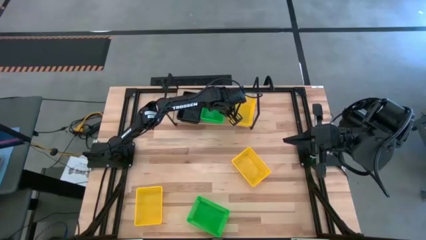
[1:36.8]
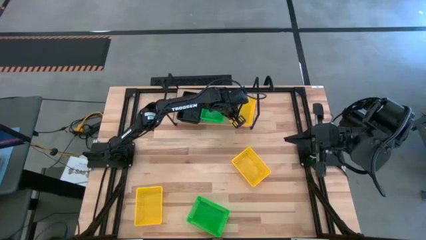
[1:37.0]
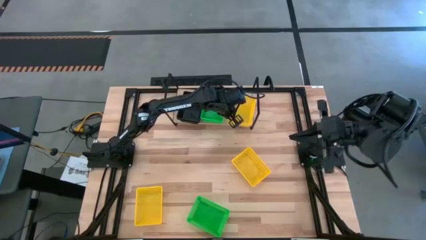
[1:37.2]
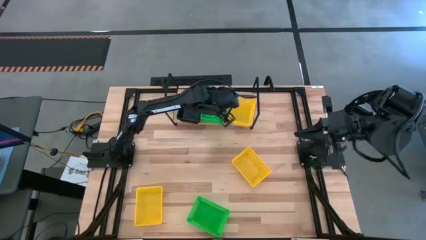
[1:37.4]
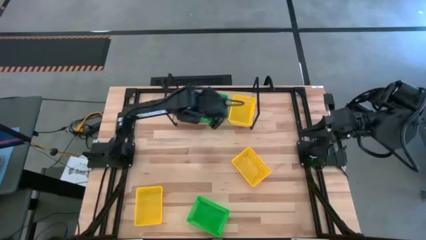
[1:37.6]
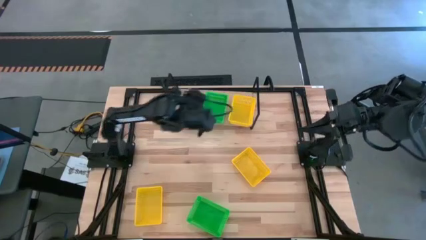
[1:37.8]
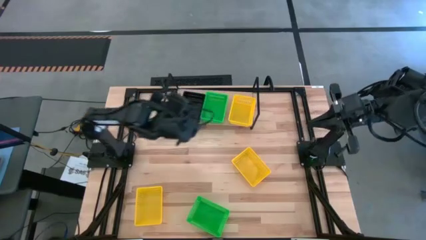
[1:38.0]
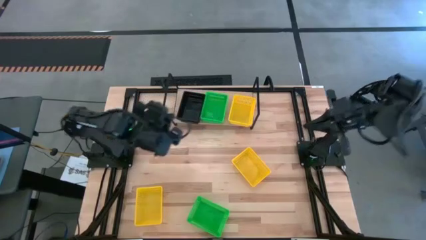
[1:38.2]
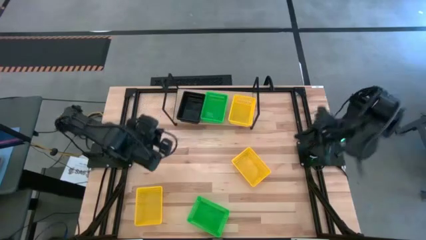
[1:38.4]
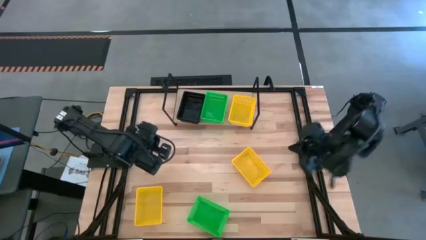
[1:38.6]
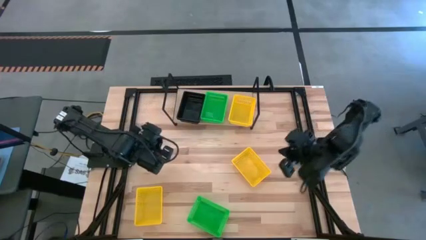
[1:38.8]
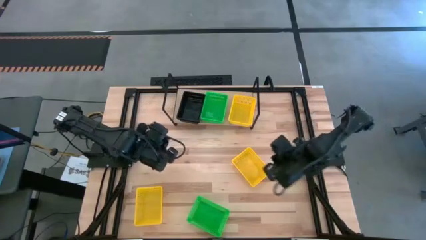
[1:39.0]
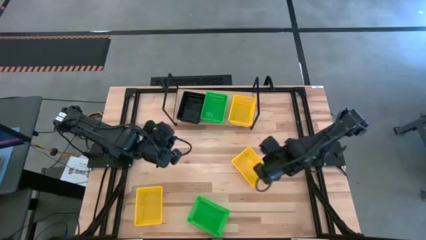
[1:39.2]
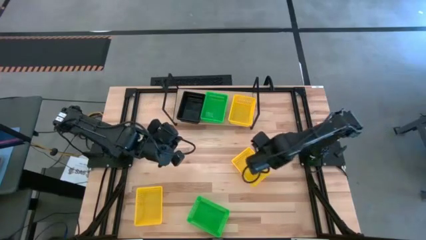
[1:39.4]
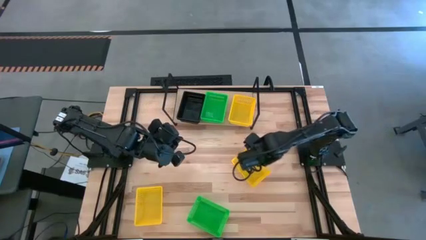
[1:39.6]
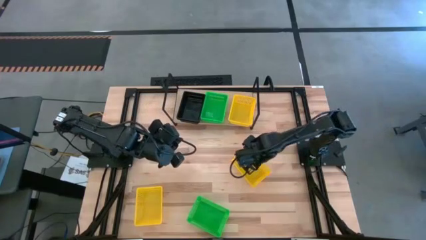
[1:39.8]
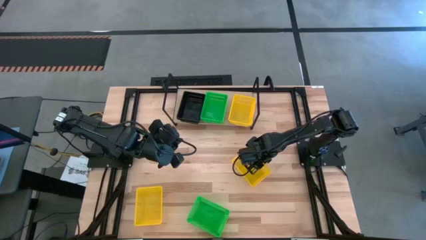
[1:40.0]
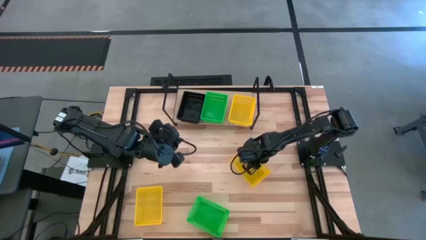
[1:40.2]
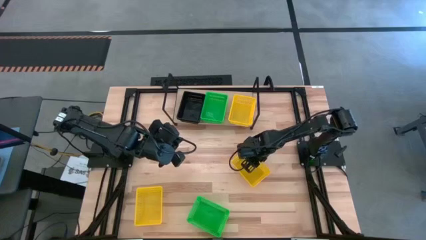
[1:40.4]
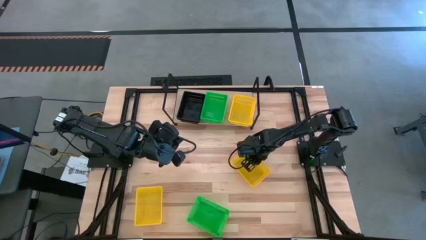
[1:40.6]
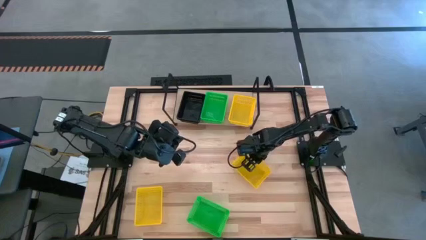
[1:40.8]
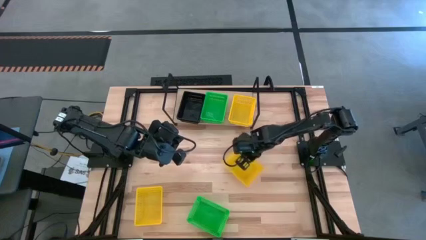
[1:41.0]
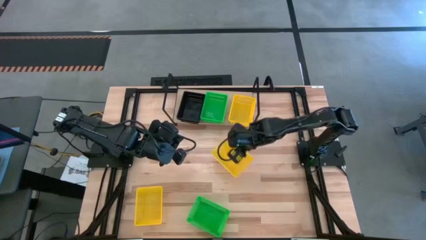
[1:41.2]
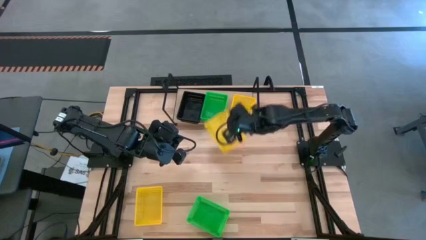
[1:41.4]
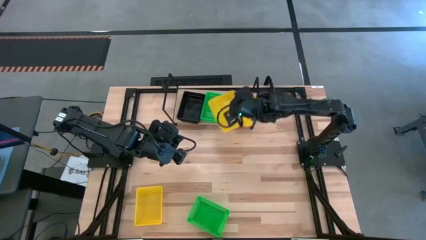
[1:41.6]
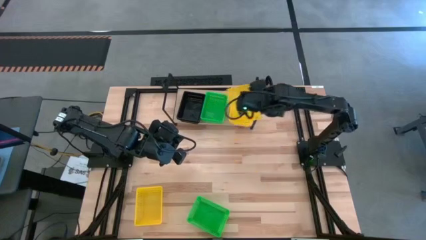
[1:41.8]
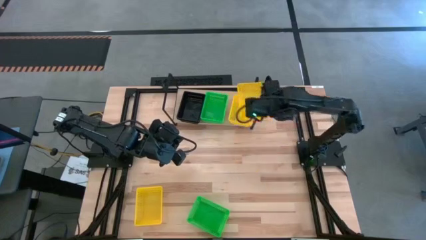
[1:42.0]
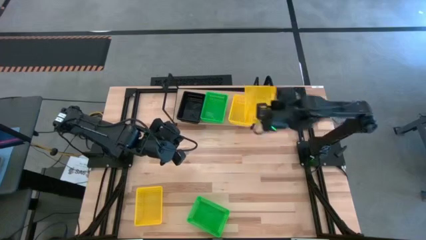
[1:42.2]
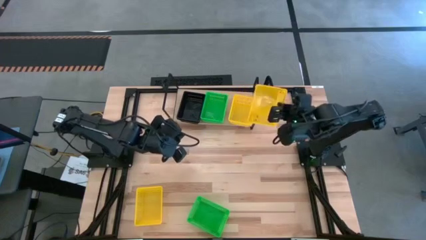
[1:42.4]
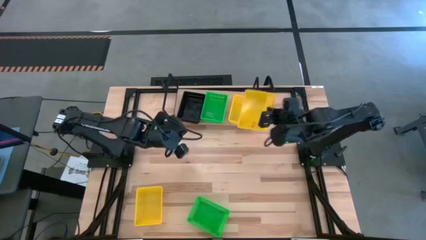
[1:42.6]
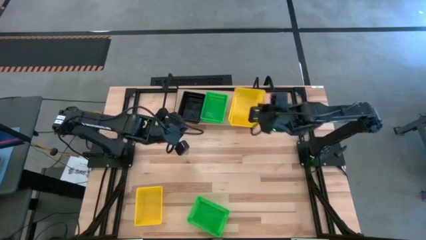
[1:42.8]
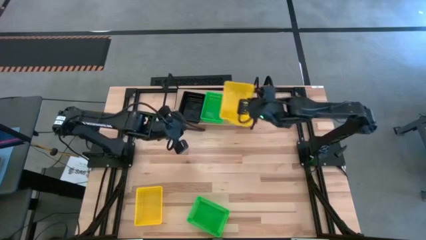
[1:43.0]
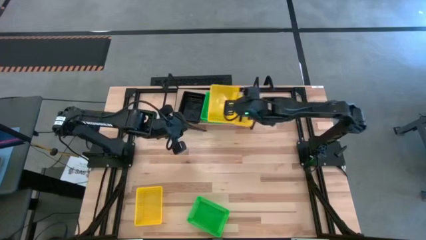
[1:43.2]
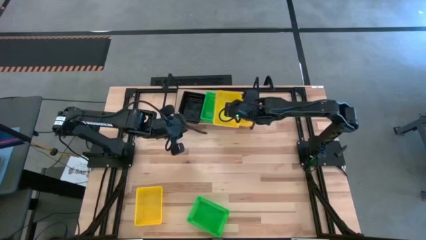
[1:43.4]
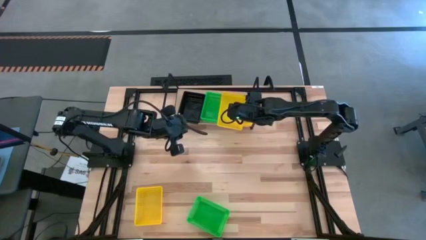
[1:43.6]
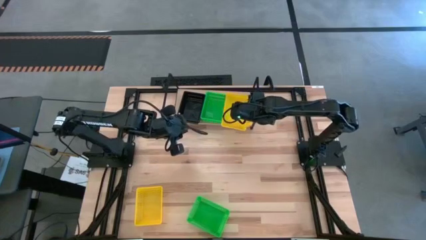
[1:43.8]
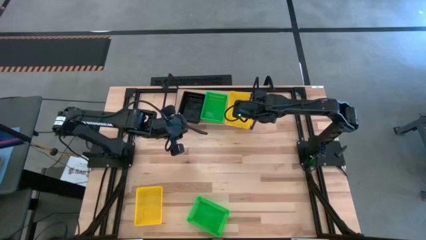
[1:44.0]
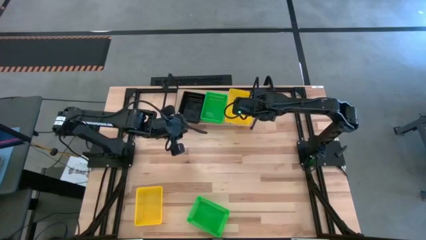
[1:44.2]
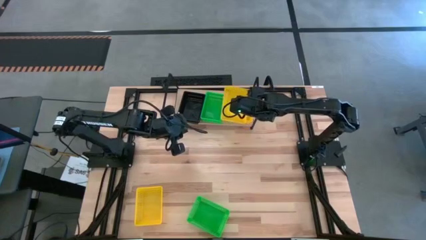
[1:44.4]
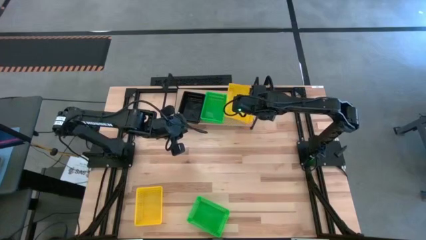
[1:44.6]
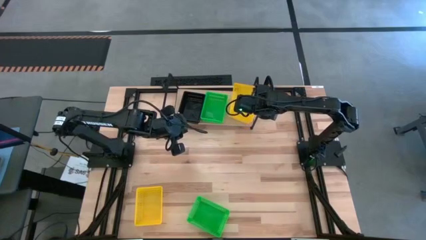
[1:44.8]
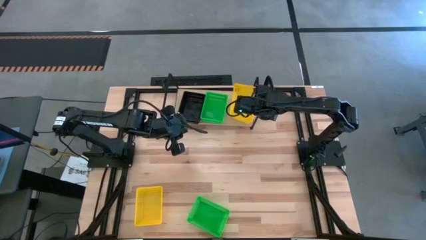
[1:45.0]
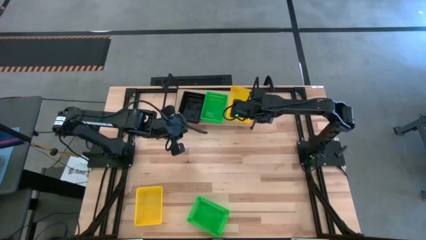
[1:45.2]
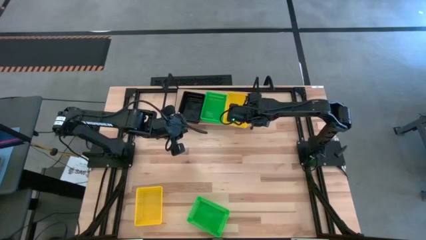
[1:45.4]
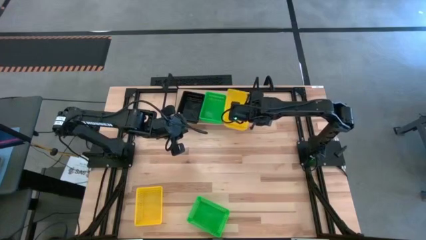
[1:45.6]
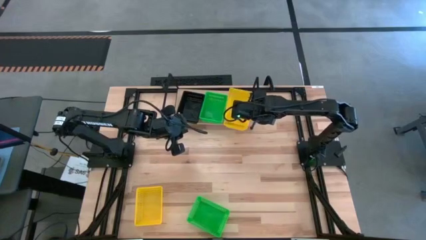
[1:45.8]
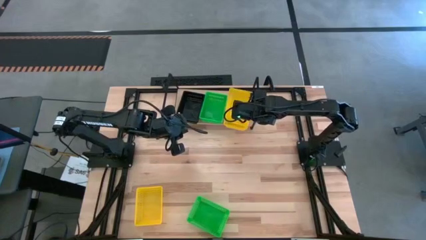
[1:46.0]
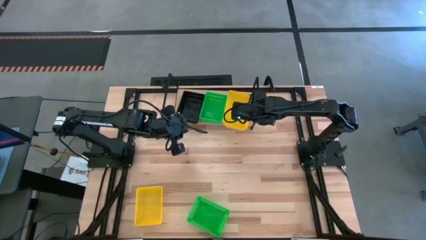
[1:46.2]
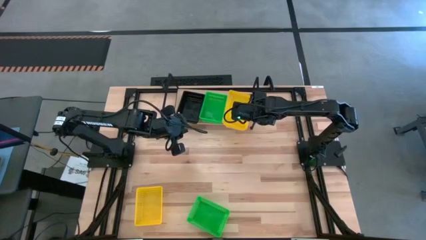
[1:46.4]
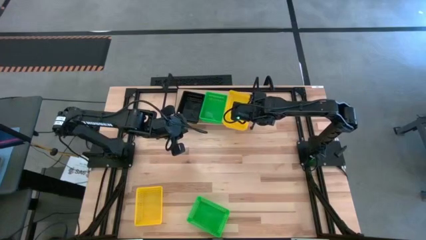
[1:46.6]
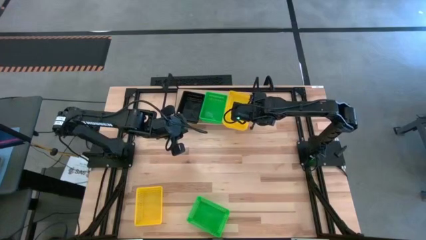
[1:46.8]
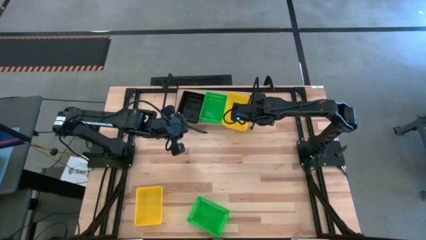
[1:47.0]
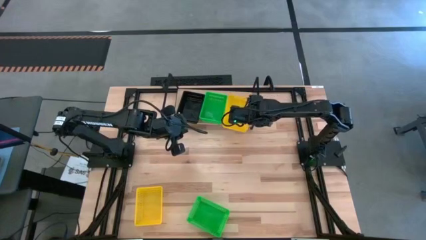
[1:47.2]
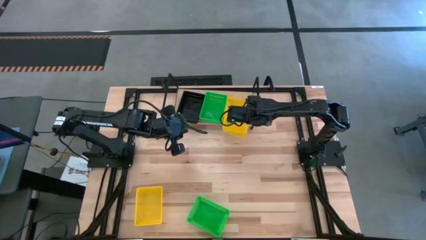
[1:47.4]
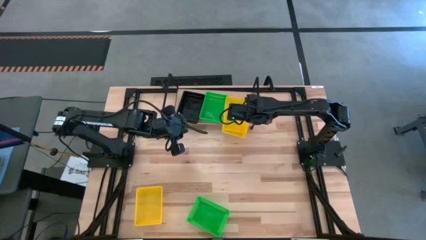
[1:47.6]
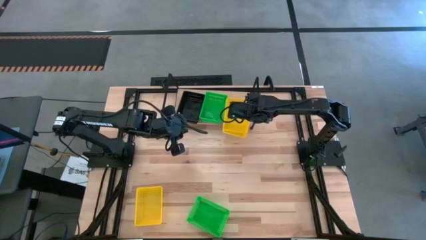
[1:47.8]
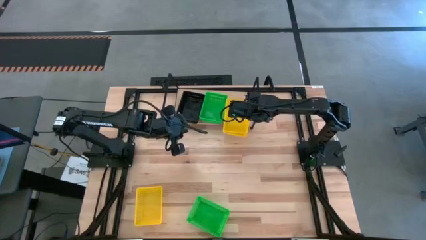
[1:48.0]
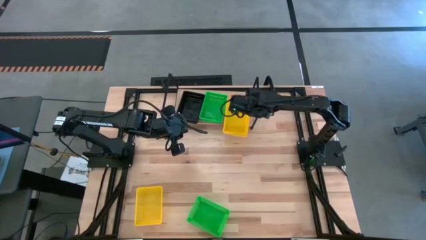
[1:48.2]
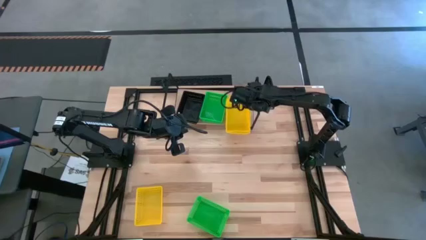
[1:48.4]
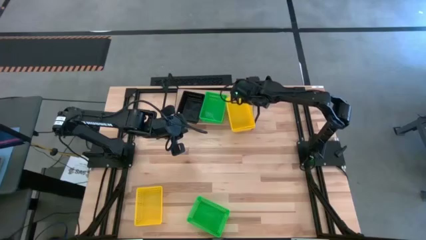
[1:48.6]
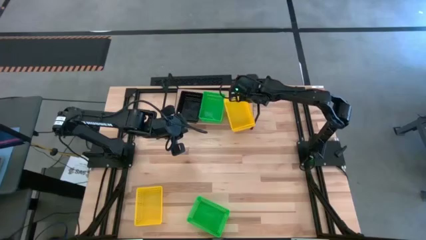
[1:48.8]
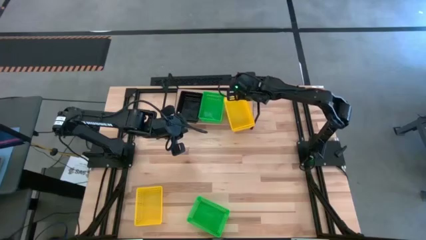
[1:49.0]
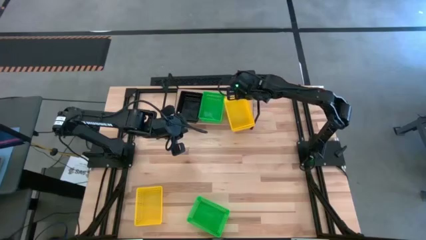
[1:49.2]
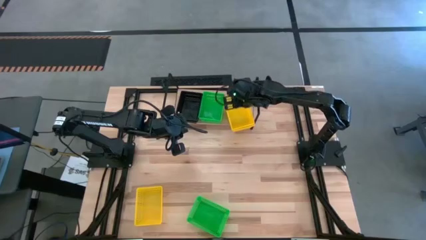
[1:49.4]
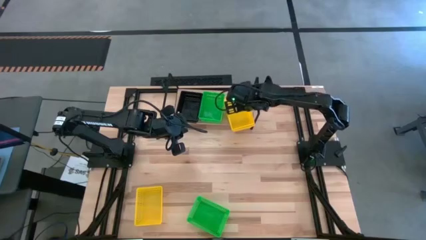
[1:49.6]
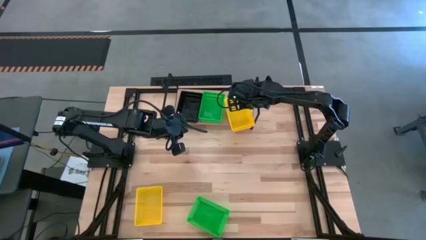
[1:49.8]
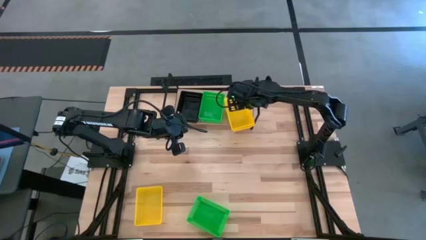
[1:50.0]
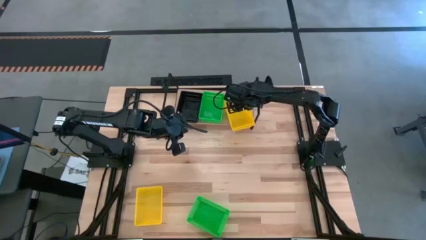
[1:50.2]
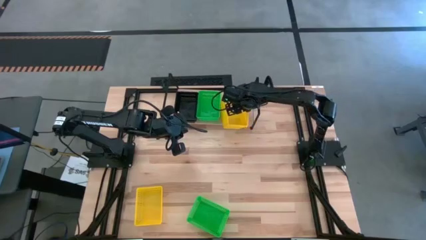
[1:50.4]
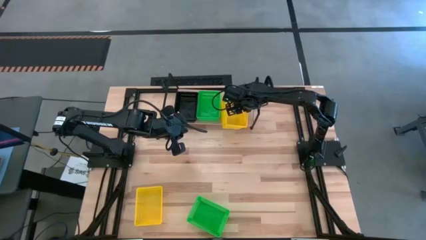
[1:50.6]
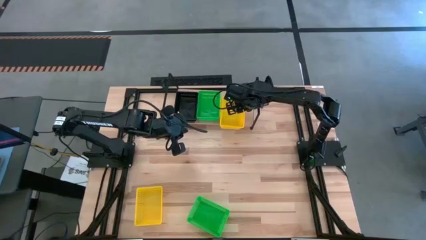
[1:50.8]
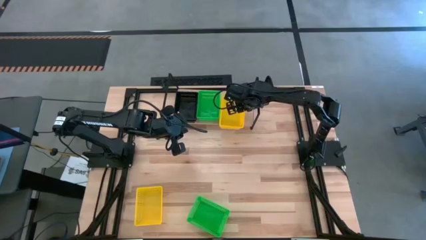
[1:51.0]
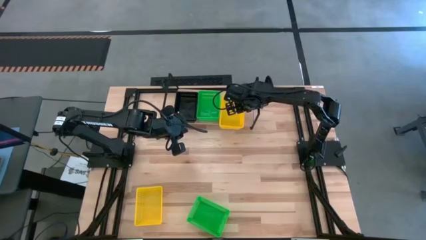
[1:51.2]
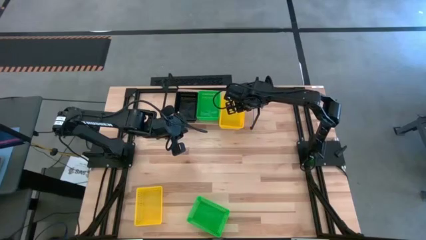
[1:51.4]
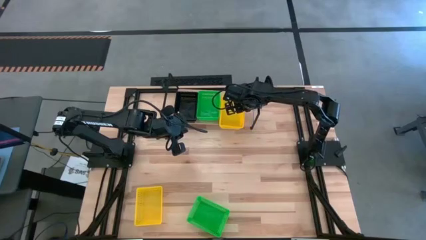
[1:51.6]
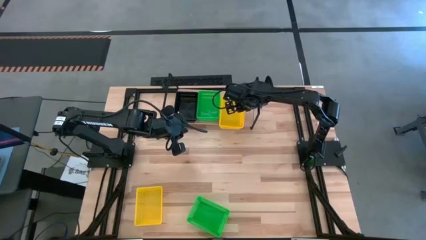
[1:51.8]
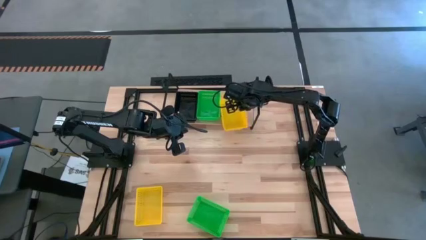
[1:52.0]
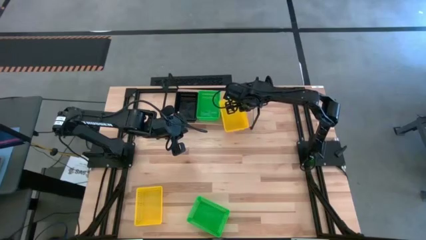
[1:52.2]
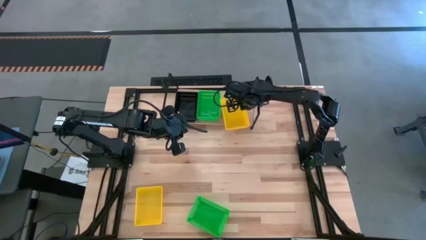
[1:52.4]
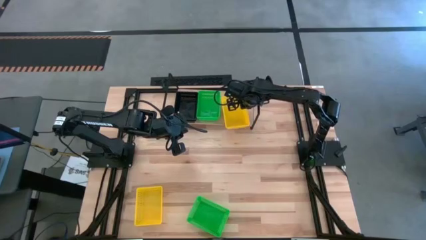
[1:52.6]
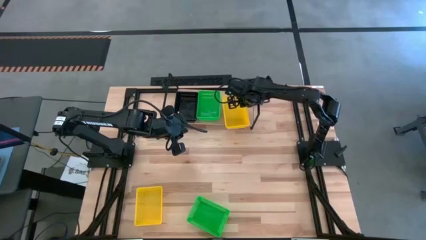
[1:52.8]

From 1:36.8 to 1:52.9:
Task: Stack baskets on shelf by color
Stack the right yellow bin on top of the yellow bin

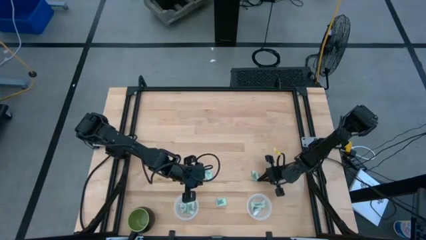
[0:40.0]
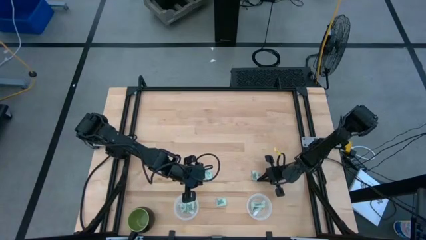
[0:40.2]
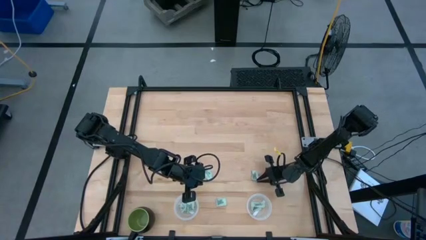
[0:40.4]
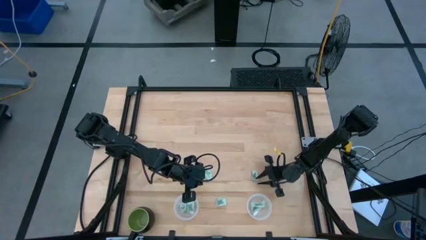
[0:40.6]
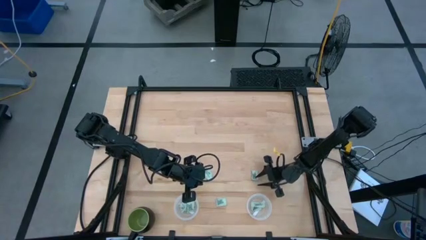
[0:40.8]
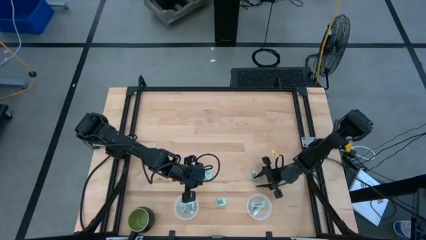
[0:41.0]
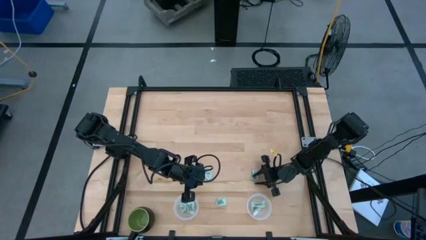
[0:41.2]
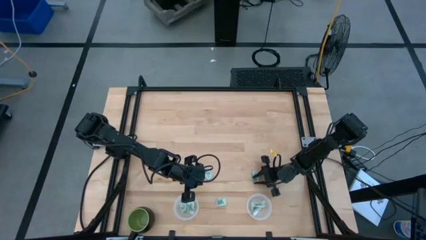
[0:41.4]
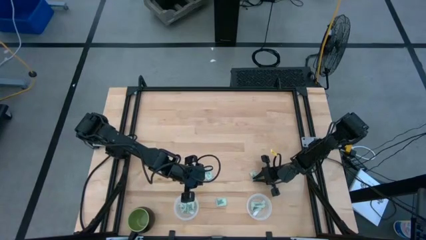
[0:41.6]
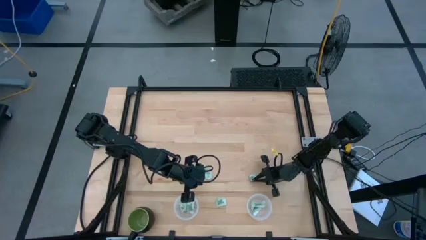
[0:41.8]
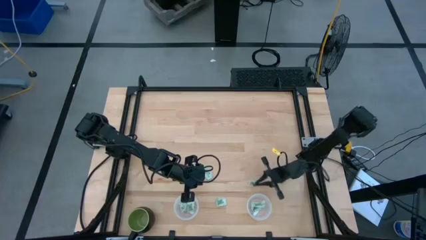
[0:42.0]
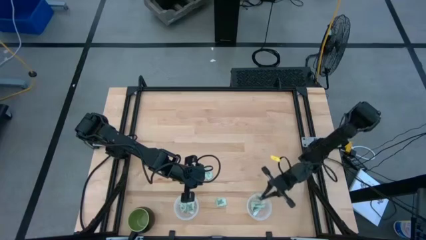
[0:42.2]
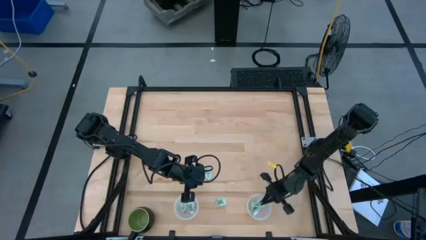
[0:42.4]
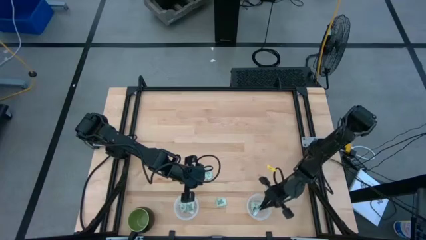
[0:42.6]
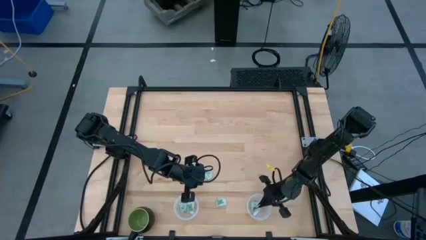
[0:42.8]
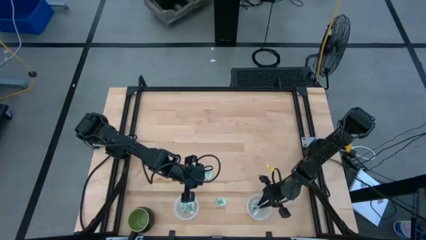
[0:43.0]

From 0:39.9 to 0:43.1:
Task: Pick and place Stevia / Truvia into bins
Put the stevia packet into the right transparent container
